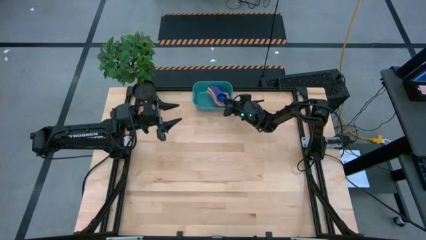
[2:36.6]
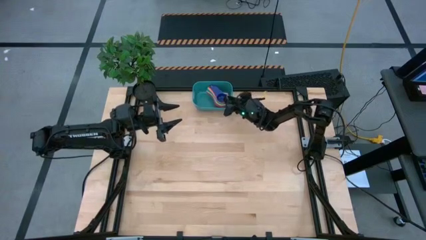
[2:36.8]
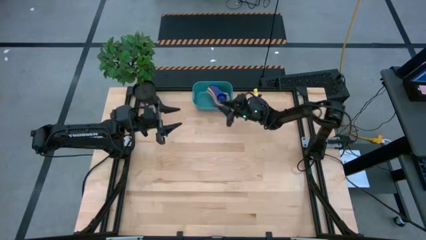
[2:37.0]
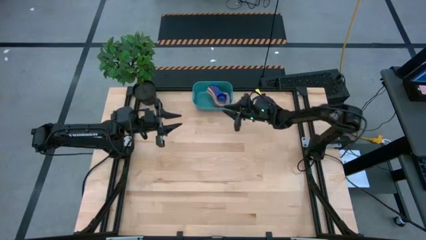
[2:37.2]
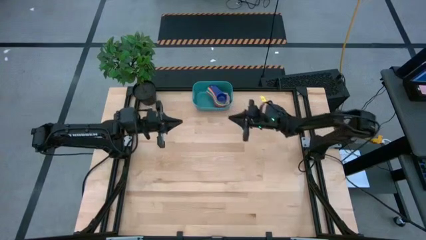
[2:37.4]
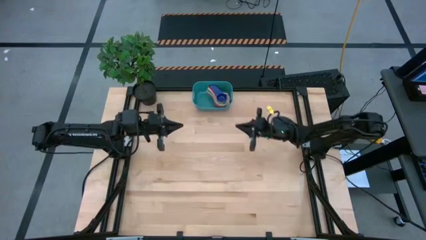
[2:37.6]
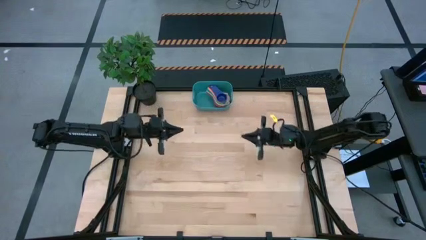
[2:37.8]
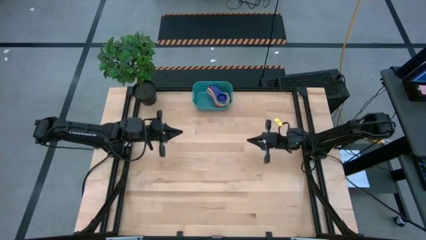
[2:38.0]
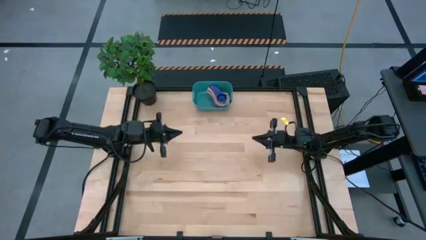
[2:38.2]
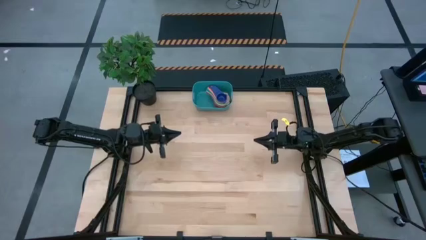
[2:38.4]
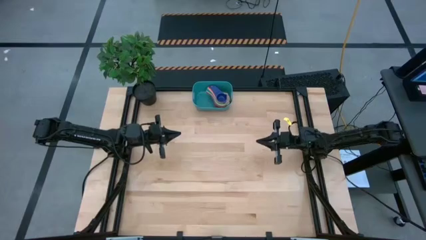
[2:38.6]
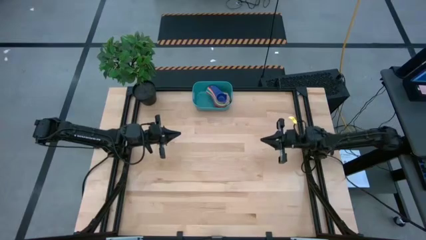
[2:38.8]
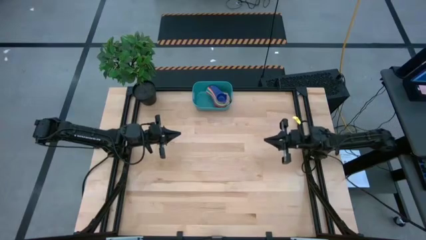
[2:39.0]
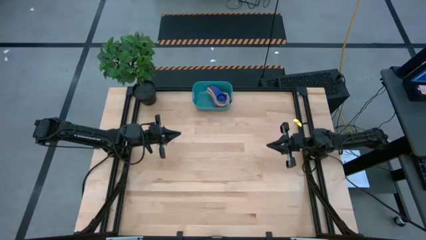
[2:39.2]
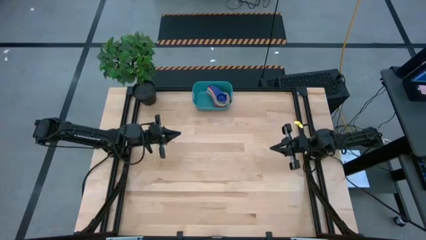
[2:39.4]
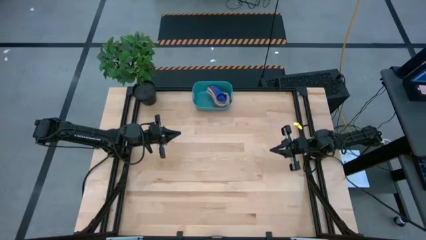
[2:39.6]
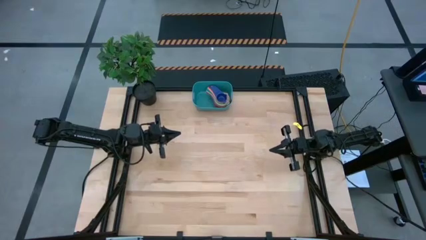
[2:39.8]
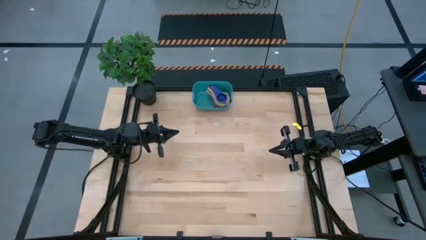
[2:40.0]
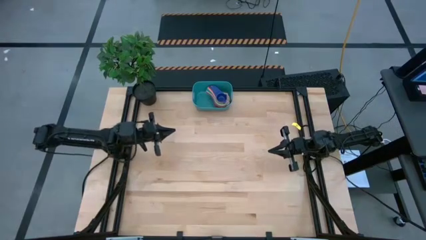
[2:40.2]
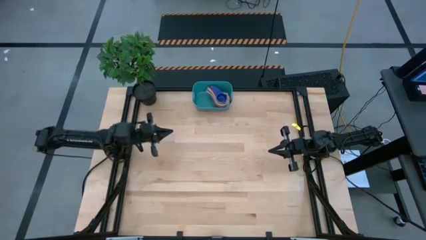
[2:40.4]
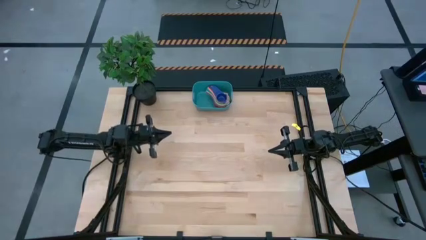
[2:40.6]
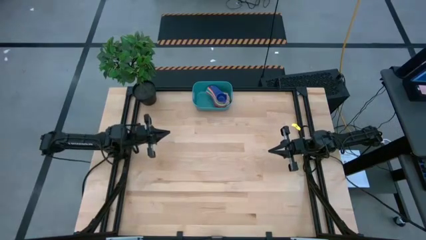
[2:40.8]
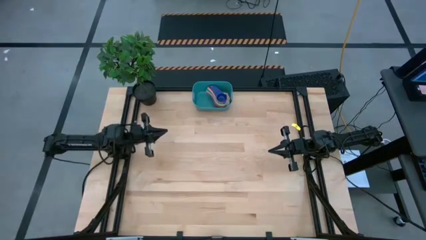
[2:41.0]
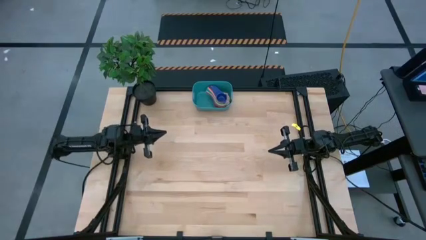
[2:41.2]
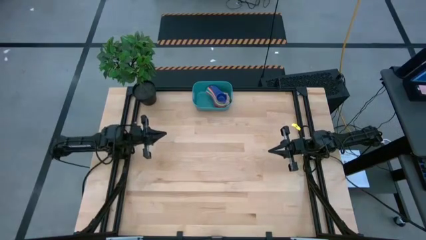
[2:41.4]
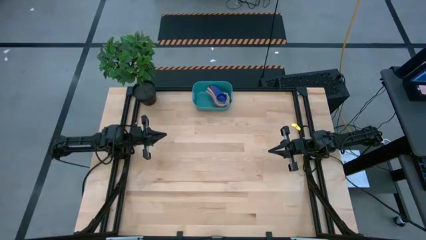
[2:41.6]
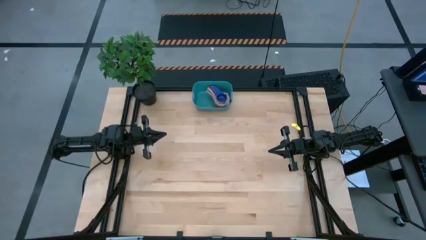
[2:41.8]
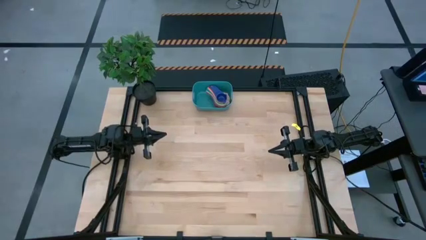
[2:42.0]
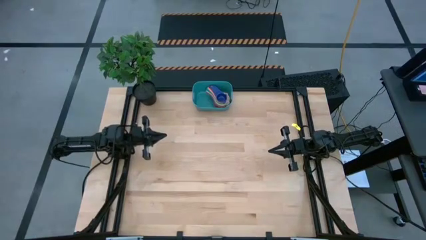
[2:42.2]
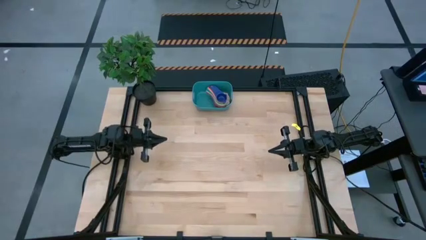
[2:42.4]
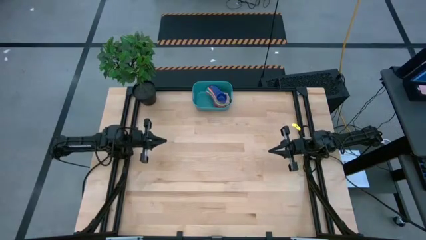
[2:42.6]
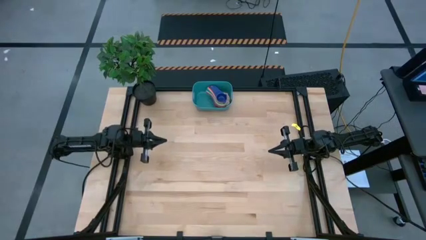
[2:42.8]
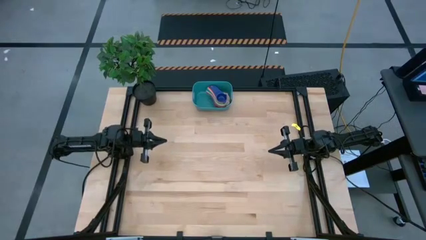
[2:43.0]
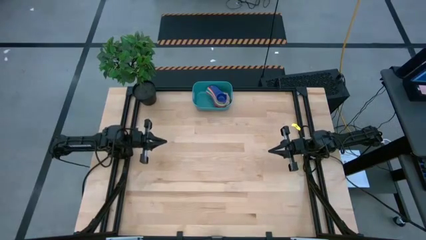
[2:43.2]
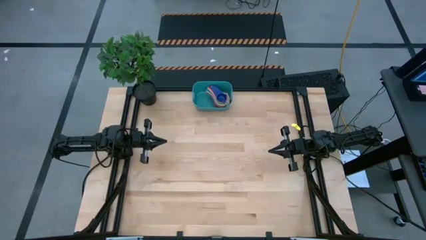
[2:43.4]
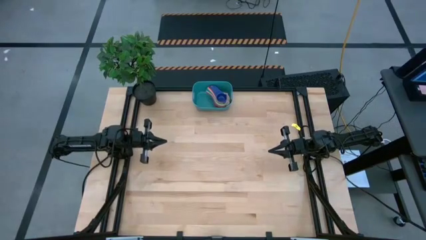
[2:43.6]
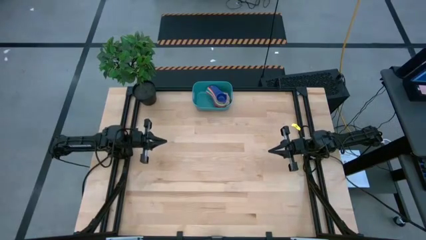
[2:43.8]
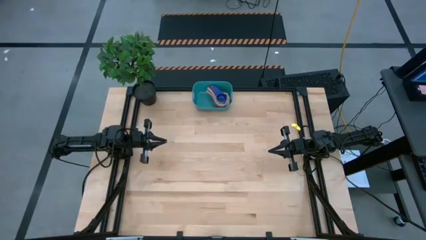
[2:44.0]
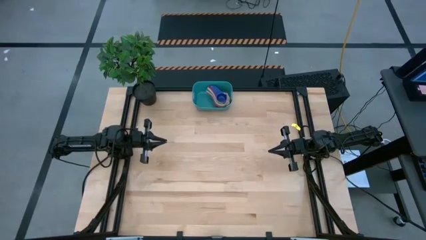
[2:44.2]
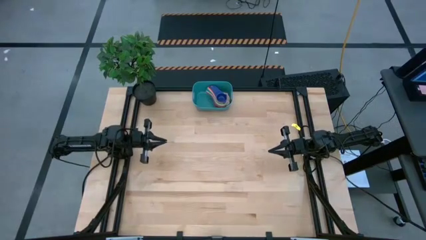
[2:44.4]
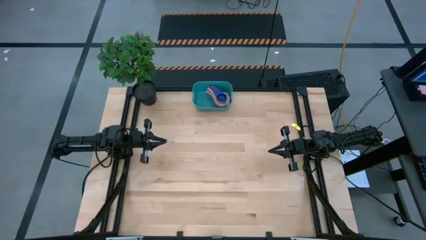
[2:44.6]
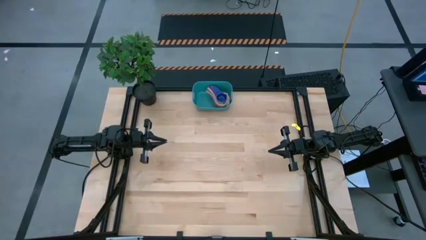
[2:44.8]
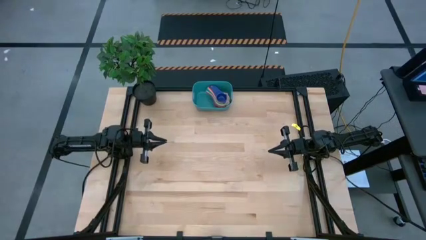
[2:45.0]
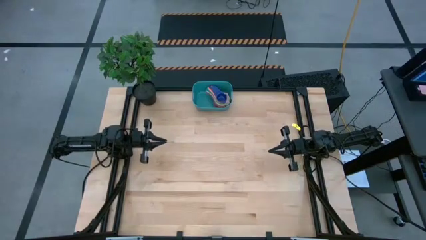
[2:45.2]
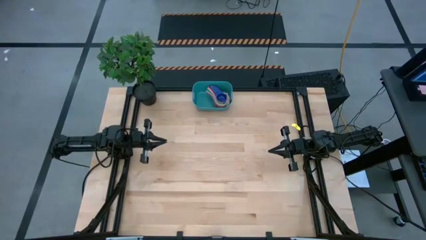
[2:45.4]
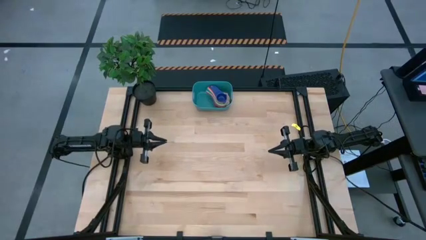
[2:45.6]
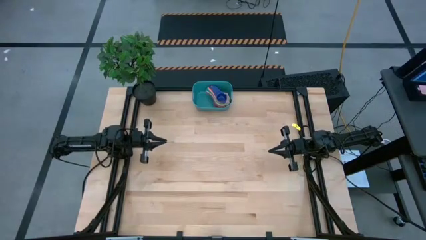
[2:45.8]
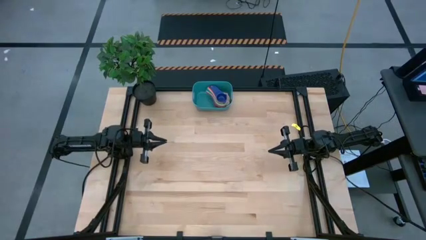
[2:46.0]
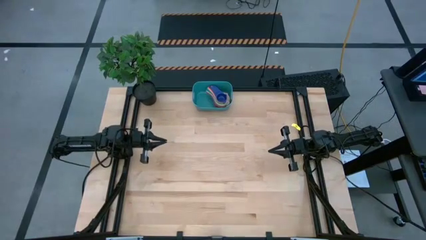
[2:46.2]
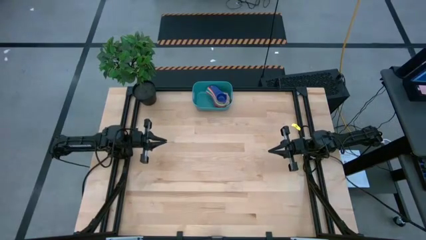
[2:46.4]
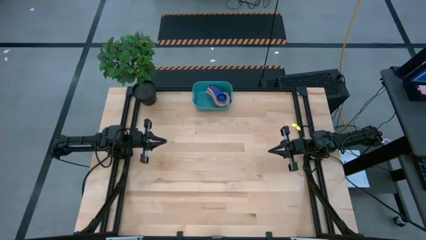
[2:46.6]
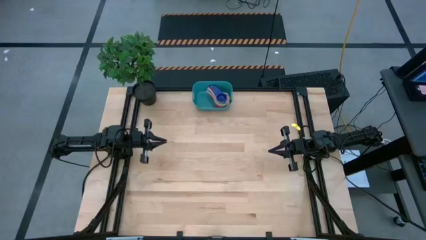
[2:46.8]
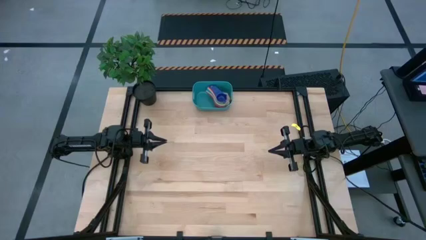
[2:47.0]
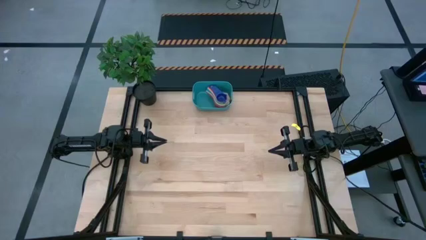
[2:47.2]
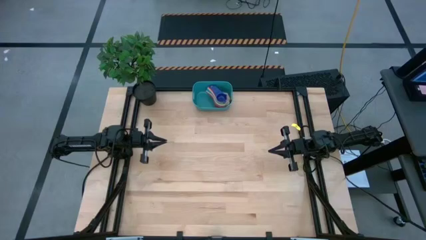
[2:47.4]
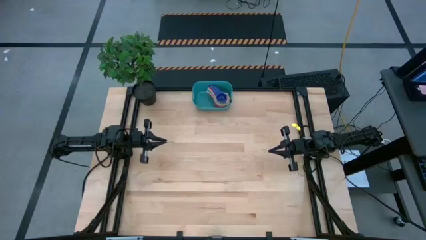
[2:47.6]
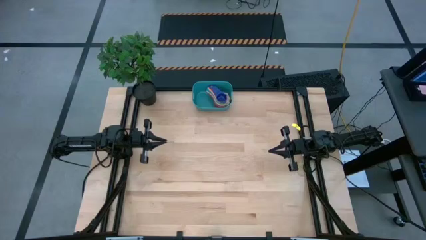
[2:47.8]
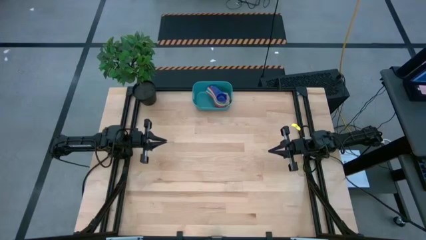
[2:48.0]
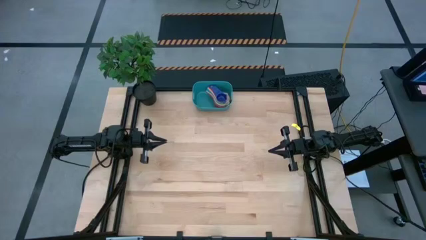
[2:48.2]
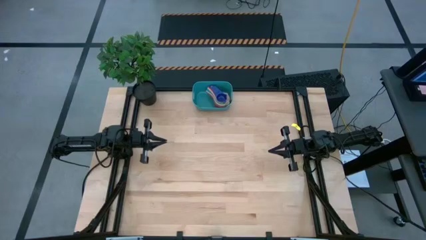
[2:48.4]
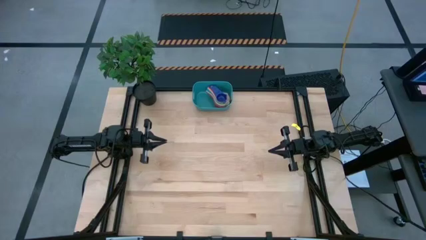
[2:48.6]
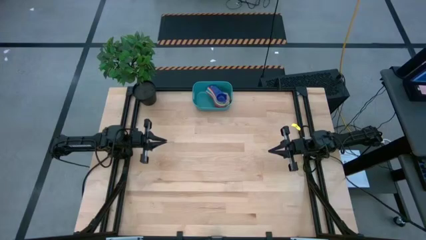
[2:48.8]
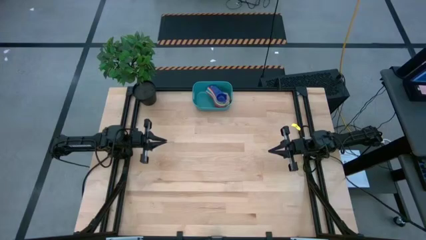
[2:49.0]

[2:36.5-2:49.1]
Task: Nest measuring cups in basket
Return to Home Position
